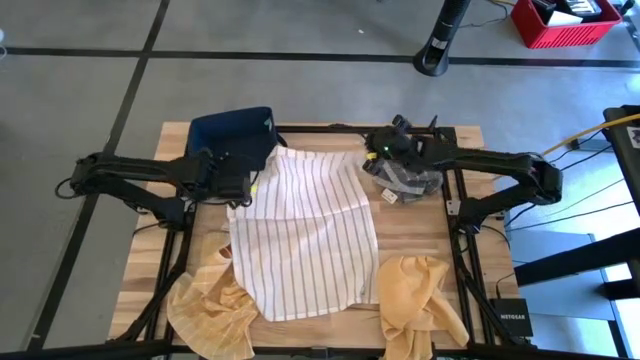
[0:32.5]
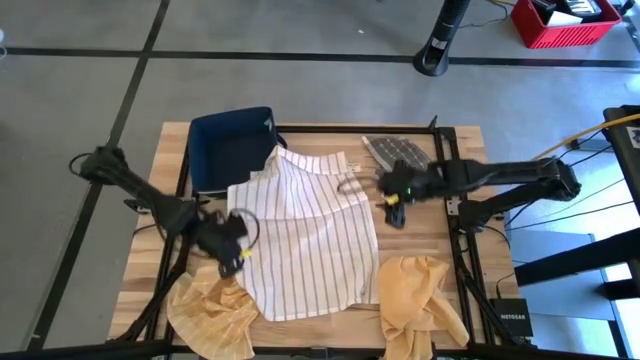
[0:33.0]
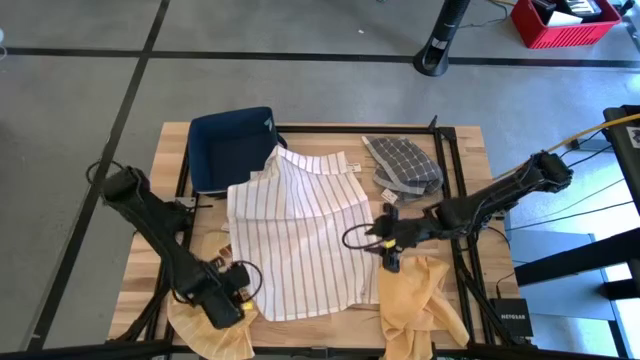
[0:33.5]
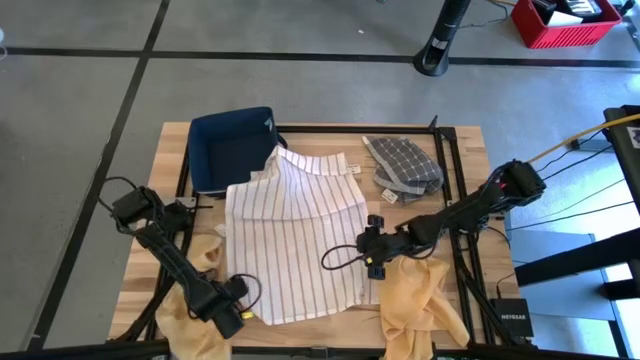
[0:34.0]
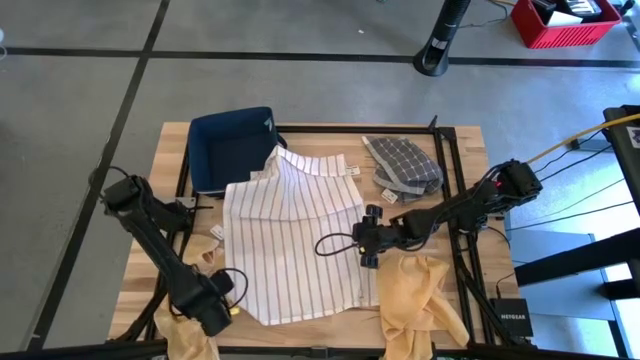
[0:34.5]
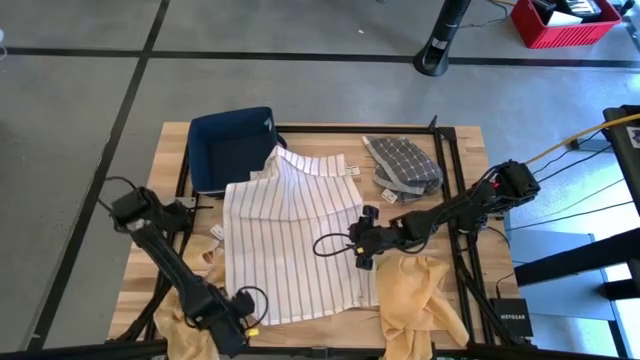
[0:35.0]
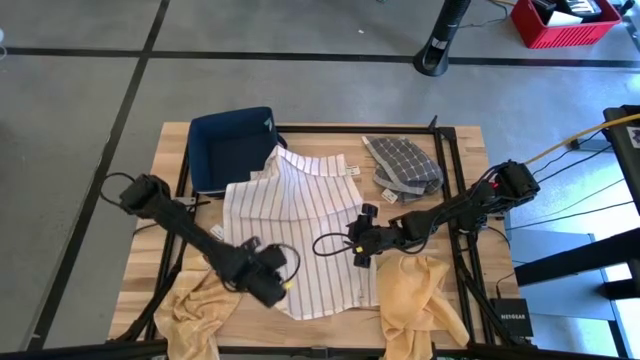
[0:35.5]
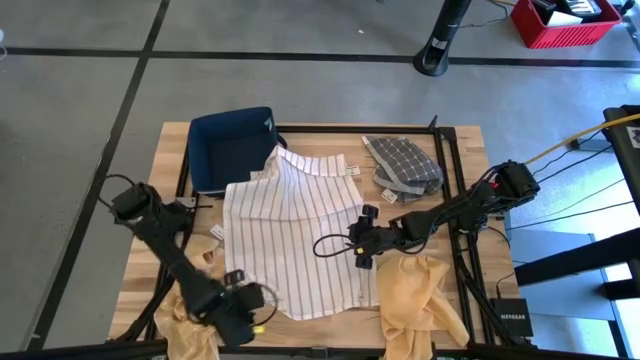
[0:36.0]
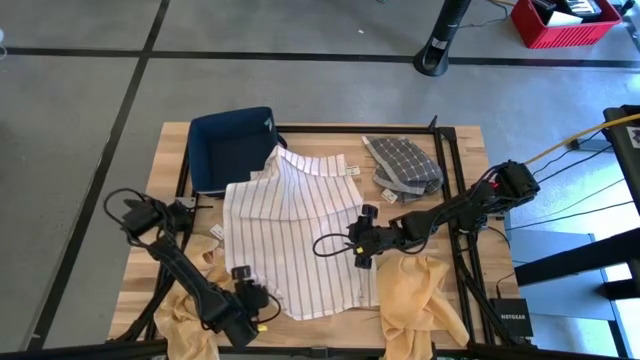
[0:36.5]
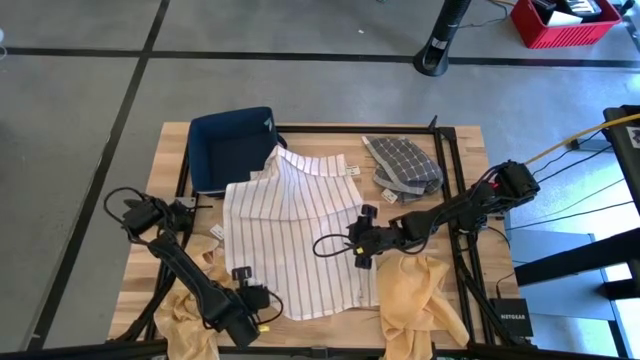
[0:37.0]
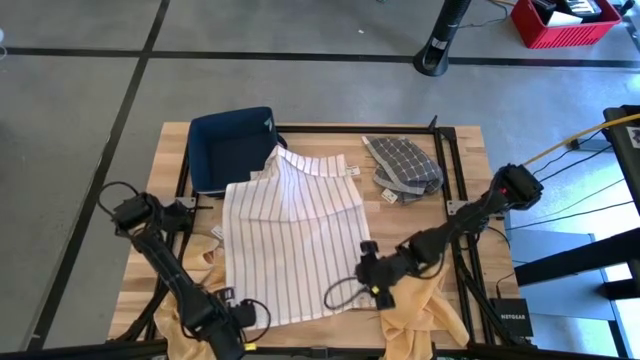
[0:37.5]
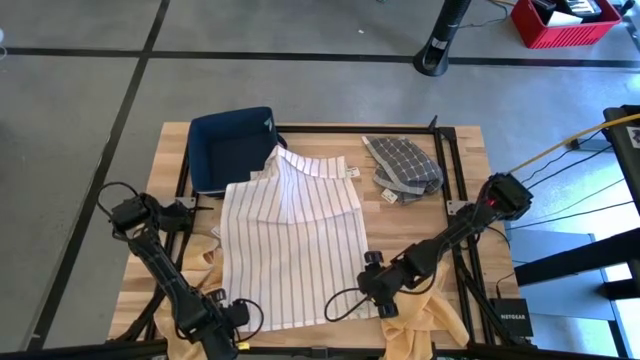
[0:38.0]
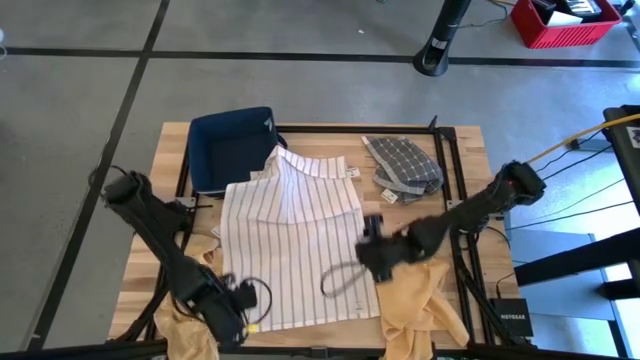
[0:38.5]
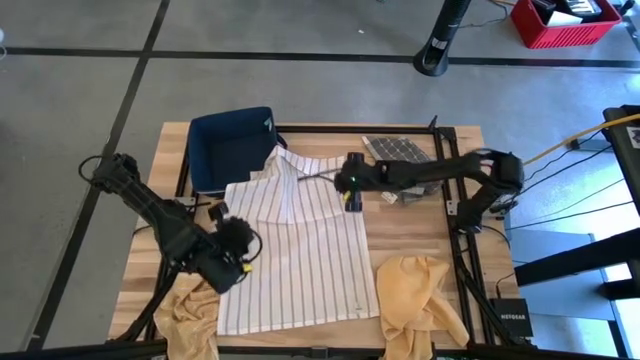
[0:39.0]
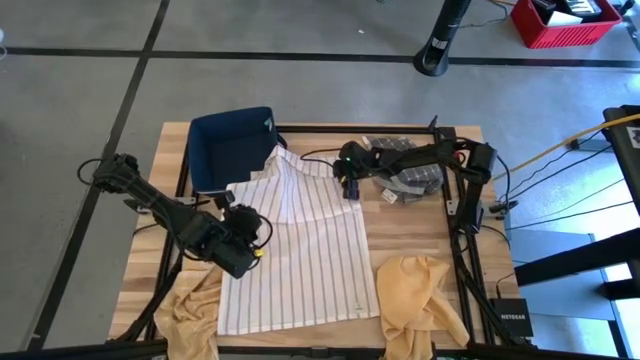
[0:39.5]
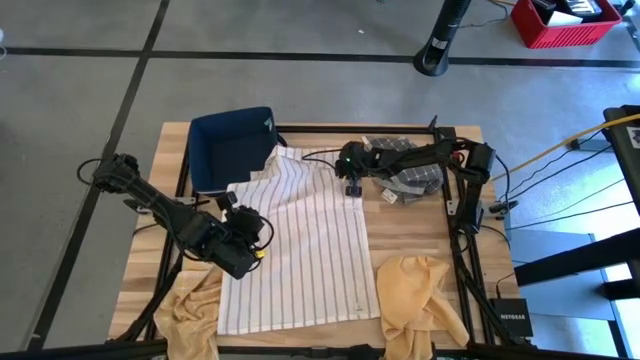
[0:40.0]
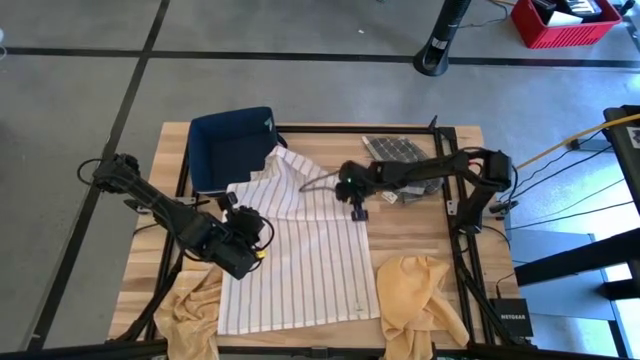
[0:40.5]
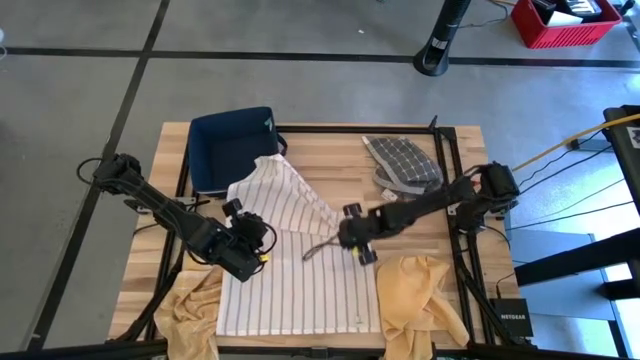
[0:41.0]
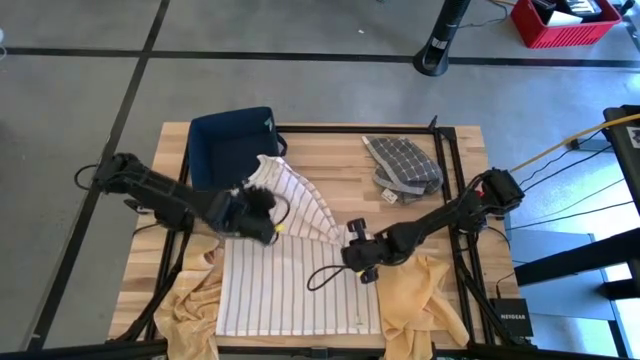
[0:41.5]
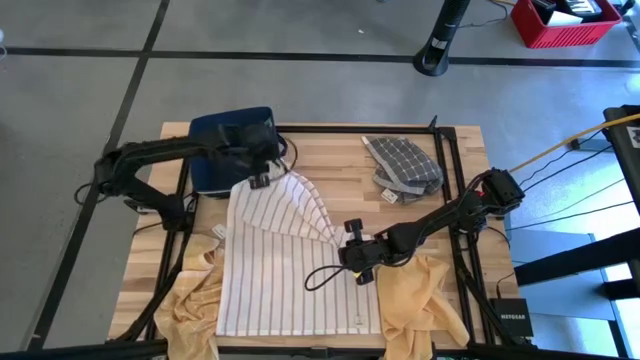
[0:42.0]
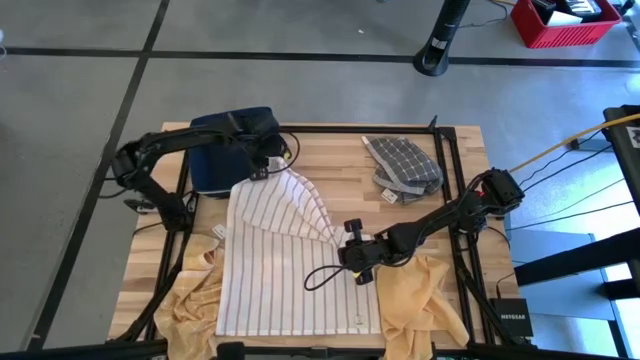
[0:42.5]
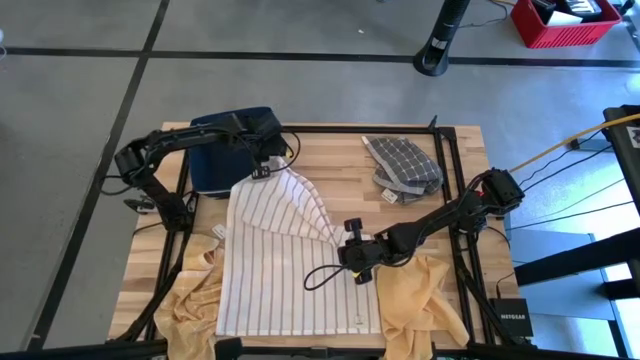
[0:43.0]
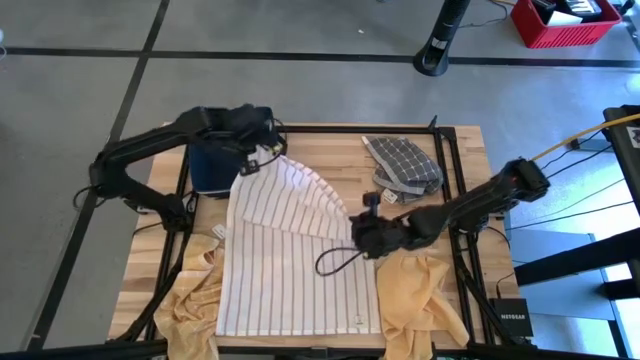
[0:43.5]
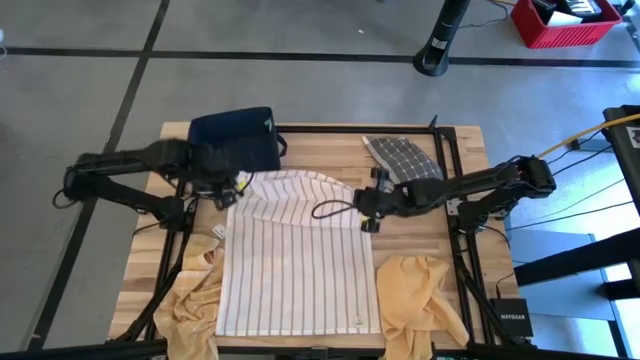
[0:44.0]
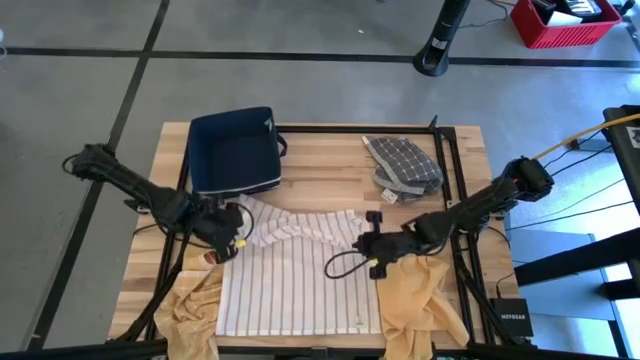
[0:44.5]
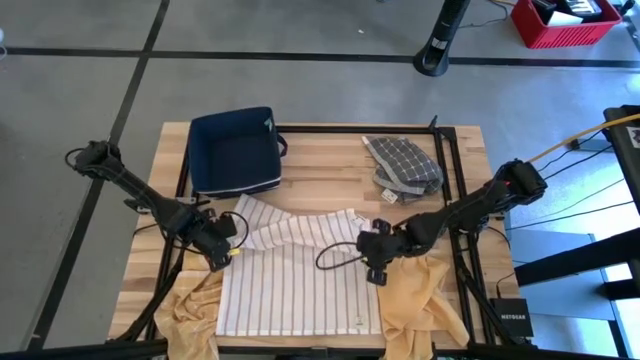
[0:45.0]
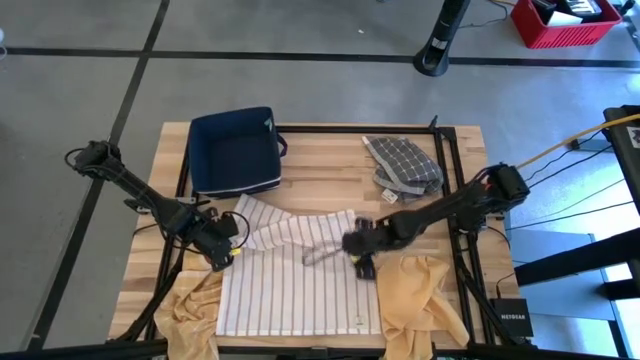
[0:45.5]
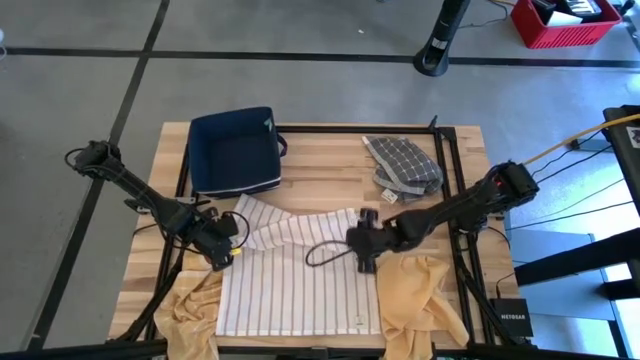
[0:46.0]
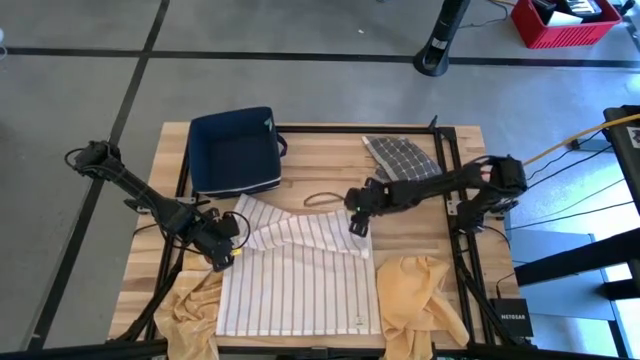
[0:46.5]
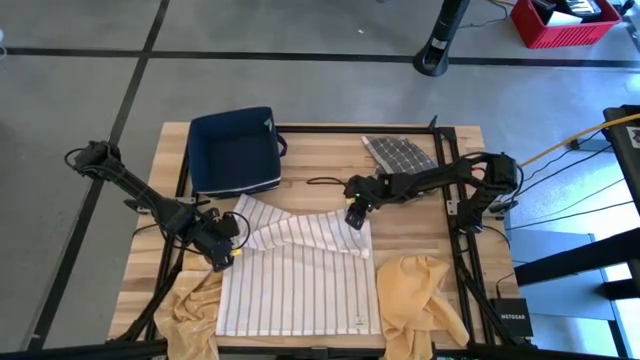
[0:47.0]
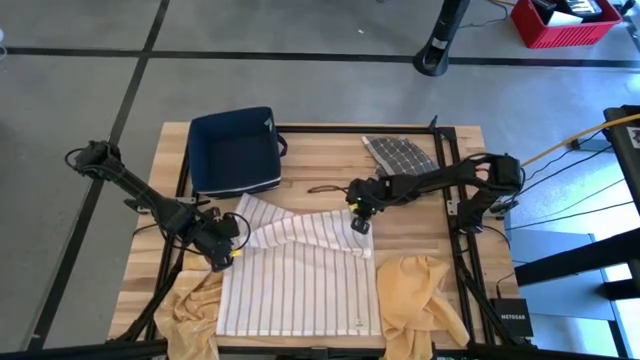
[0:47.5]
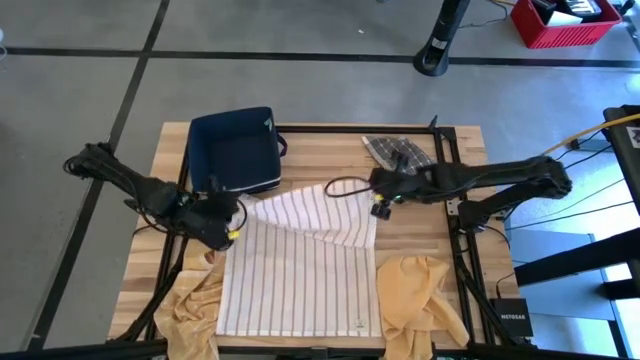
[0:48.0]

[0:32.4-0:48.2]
Task: Fold towel
Fold the white towel

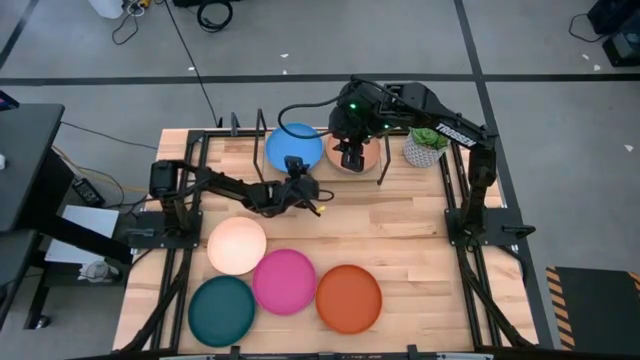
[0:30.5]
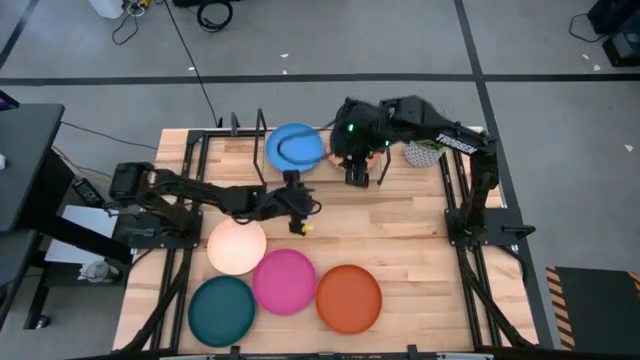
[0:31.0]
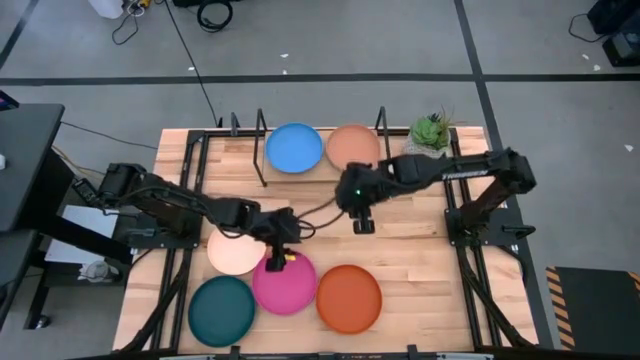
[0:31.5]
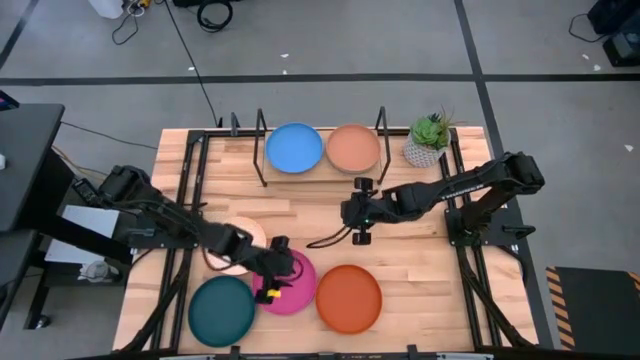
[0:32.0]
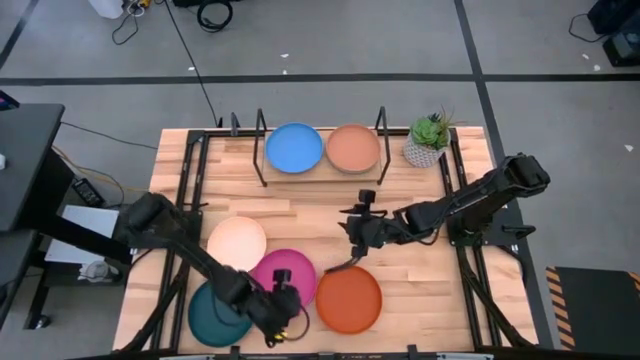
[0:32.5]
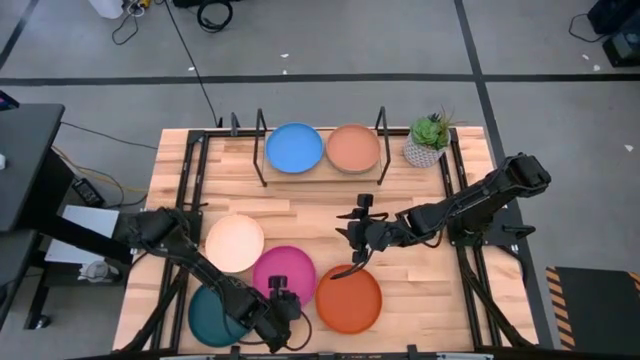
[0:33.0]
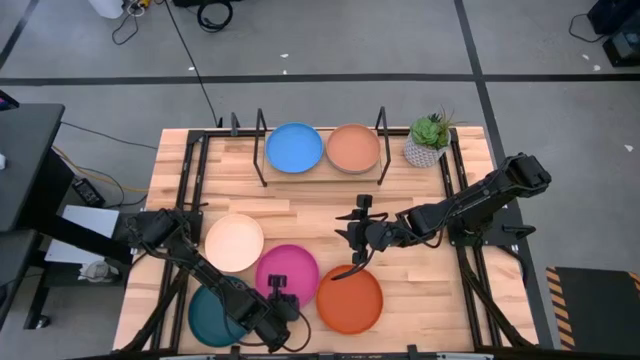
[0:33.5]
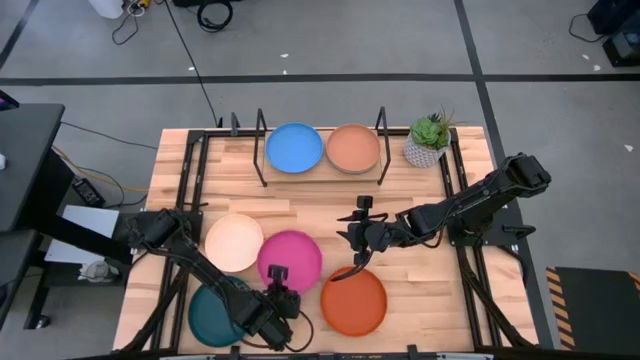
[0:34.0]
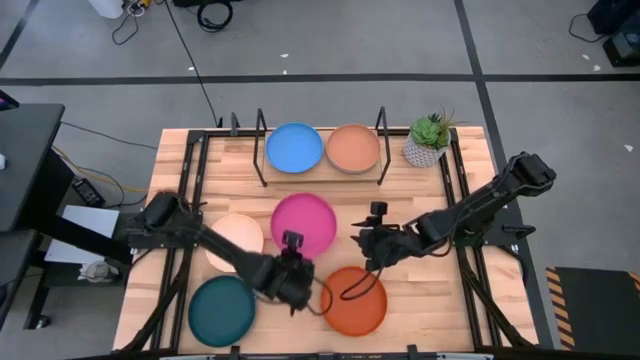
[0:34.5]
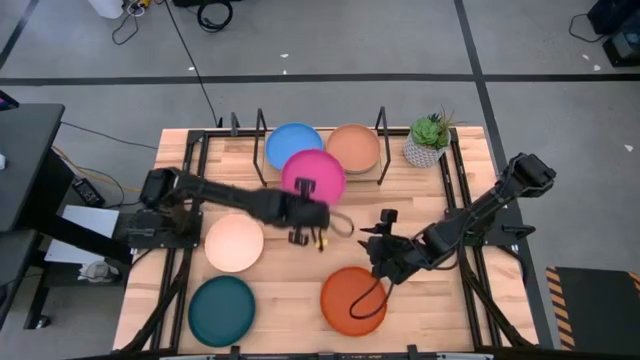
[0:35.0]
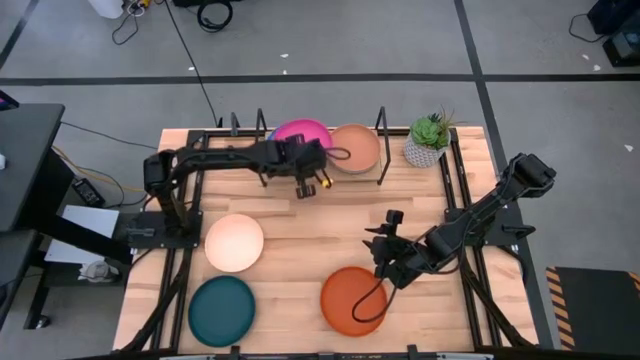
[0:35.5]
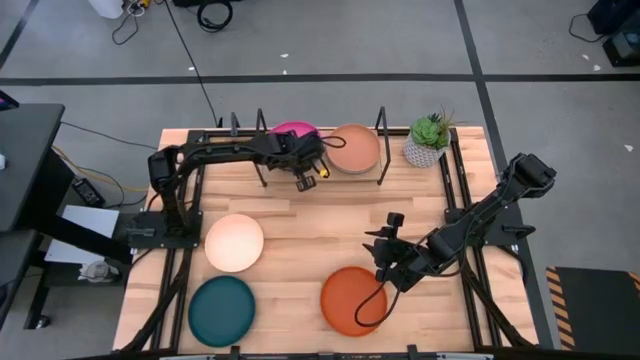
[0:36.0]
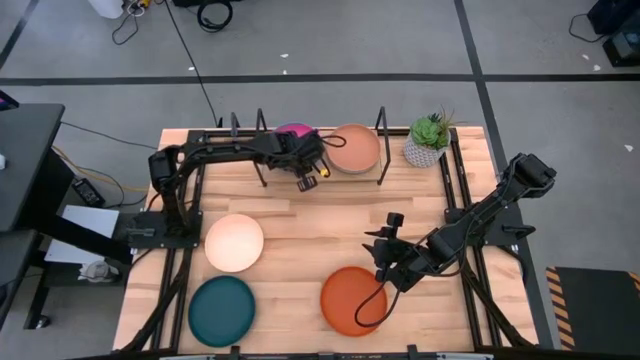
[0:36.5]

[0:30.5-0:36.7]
Task: Place and stack plates onto a shelf
Stack the pink plate on top of the blue plate on the shelf
